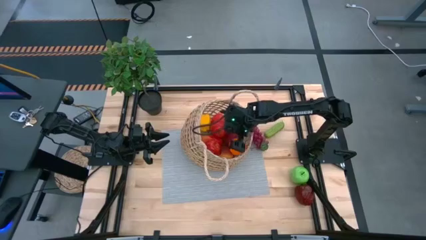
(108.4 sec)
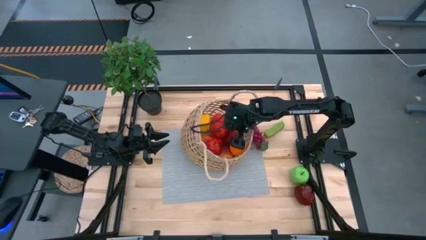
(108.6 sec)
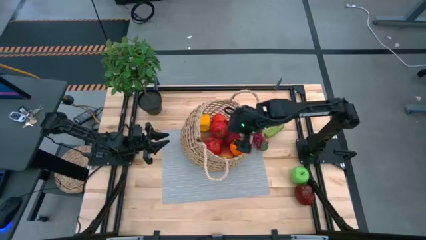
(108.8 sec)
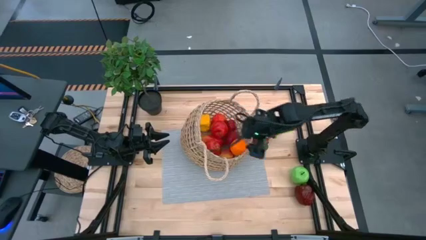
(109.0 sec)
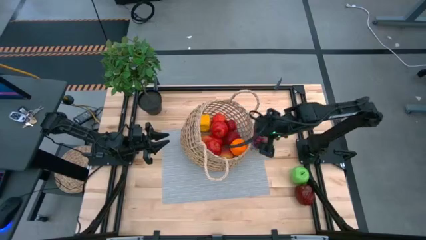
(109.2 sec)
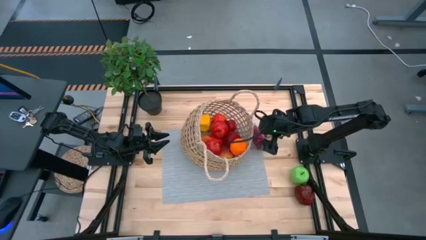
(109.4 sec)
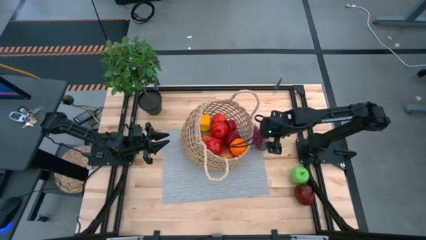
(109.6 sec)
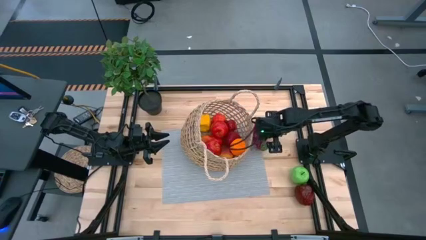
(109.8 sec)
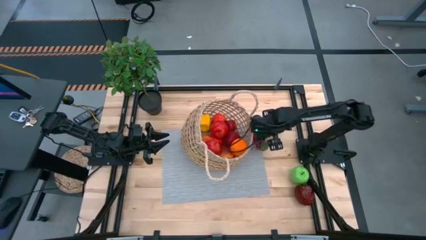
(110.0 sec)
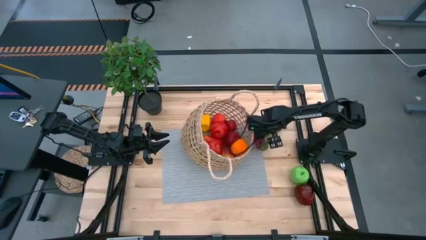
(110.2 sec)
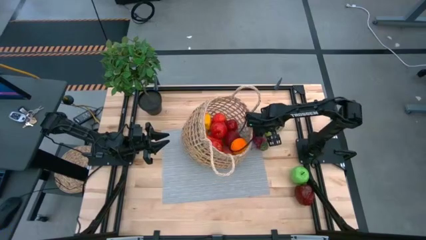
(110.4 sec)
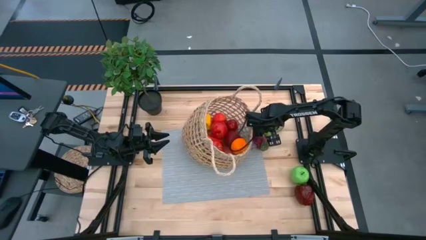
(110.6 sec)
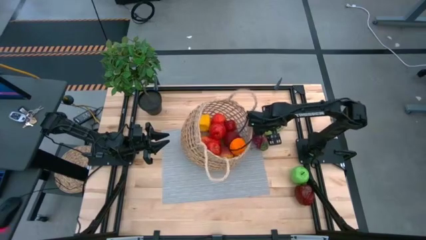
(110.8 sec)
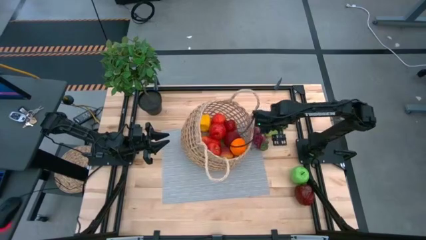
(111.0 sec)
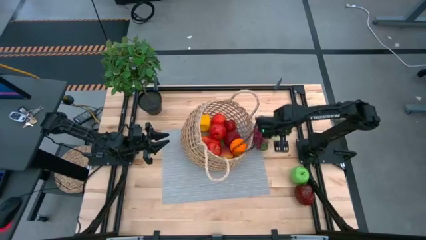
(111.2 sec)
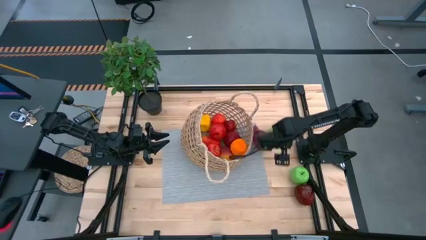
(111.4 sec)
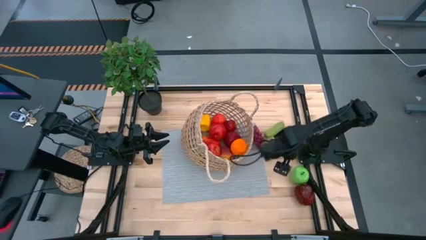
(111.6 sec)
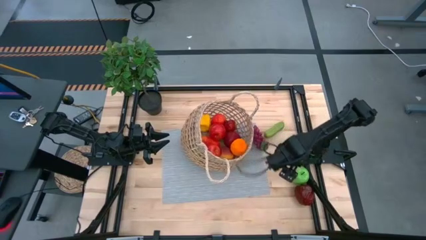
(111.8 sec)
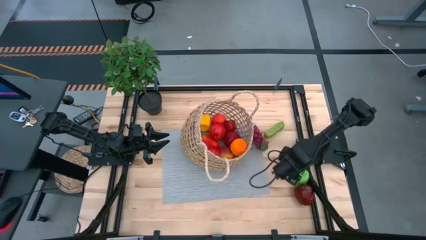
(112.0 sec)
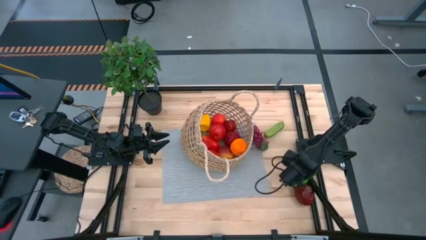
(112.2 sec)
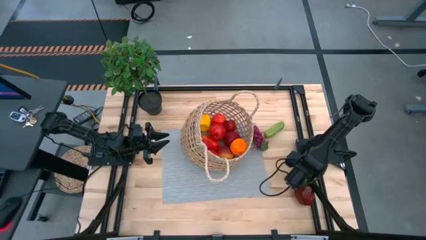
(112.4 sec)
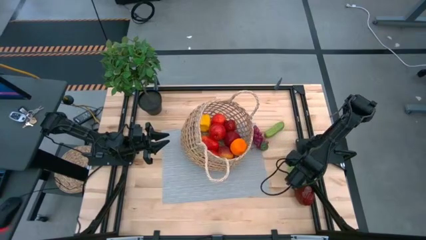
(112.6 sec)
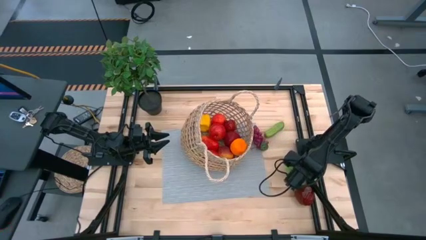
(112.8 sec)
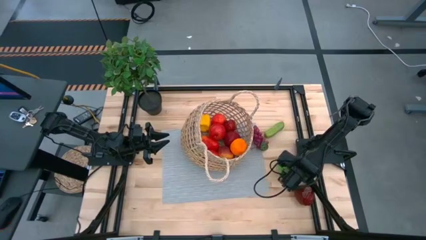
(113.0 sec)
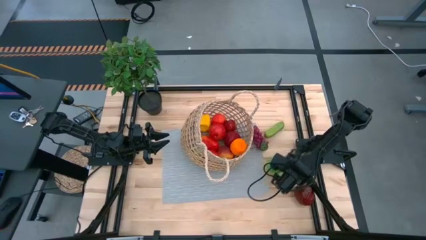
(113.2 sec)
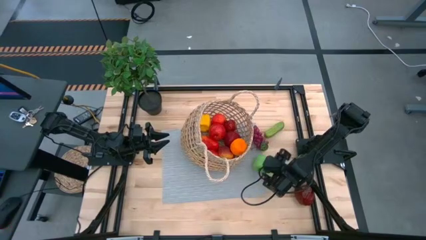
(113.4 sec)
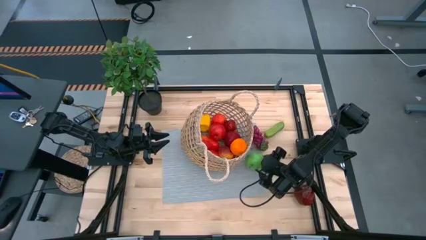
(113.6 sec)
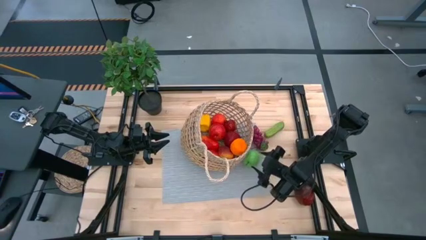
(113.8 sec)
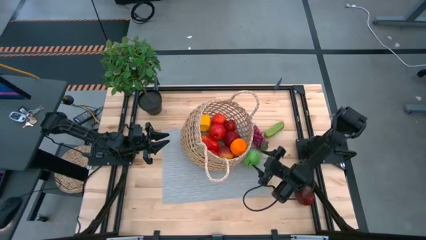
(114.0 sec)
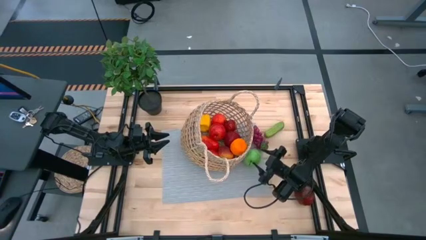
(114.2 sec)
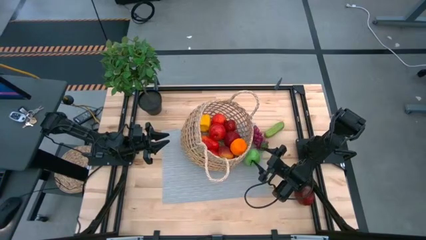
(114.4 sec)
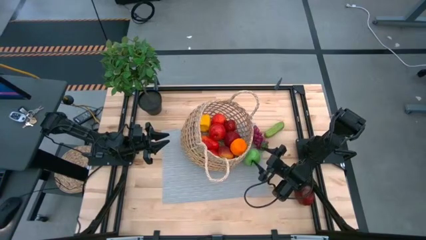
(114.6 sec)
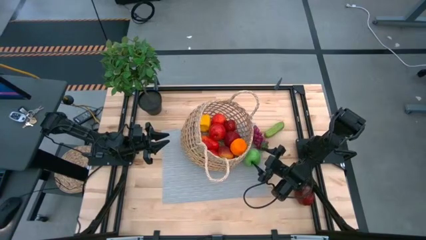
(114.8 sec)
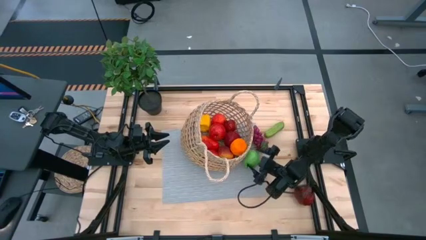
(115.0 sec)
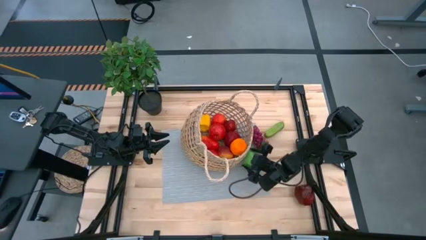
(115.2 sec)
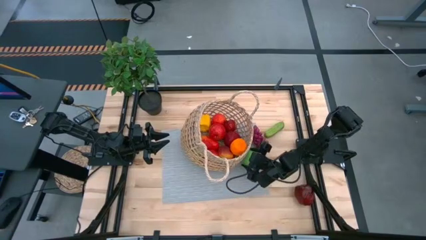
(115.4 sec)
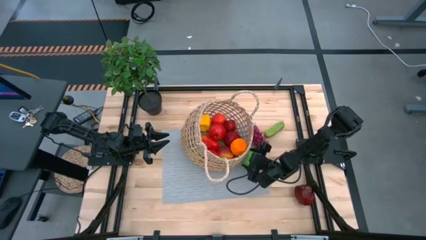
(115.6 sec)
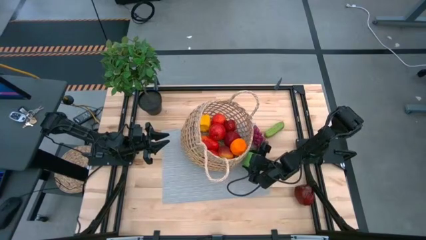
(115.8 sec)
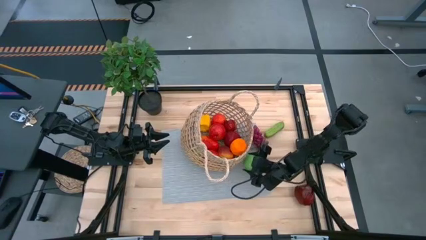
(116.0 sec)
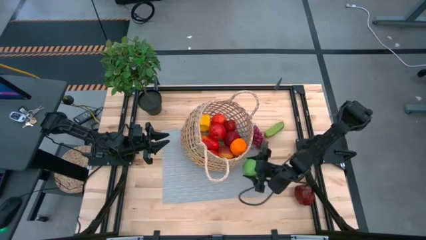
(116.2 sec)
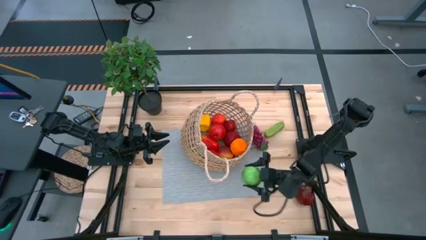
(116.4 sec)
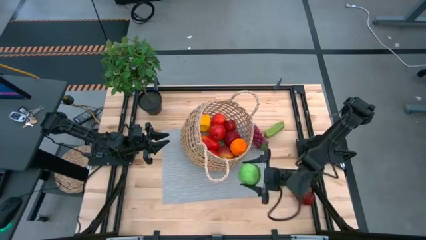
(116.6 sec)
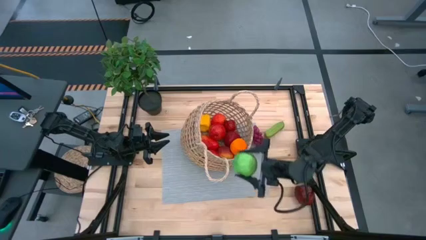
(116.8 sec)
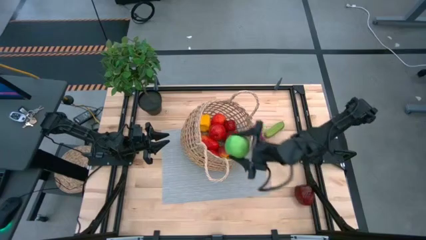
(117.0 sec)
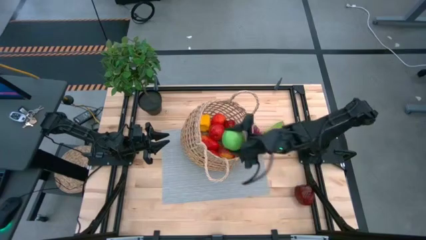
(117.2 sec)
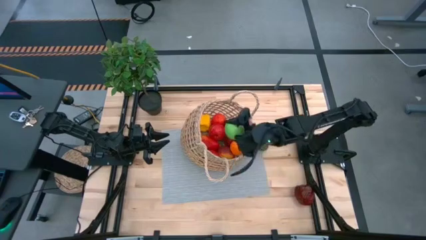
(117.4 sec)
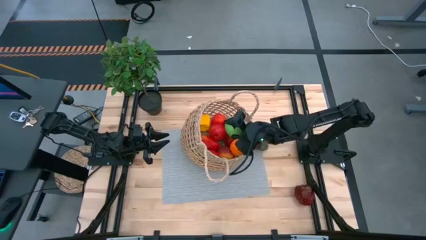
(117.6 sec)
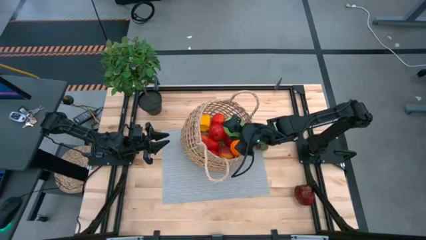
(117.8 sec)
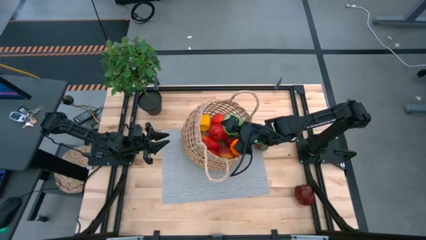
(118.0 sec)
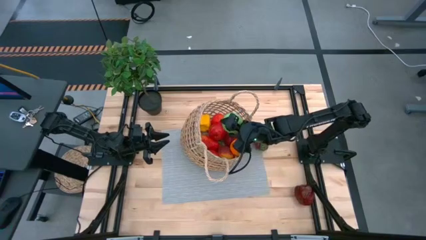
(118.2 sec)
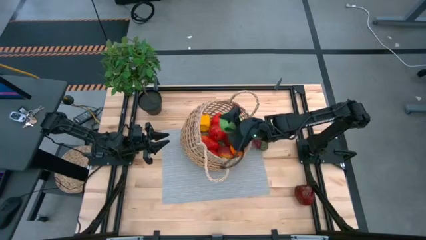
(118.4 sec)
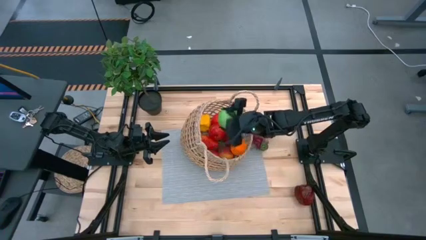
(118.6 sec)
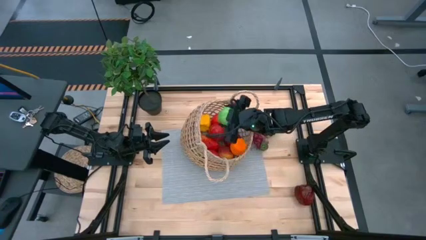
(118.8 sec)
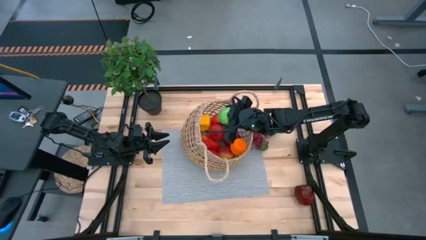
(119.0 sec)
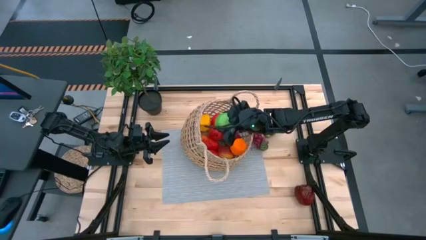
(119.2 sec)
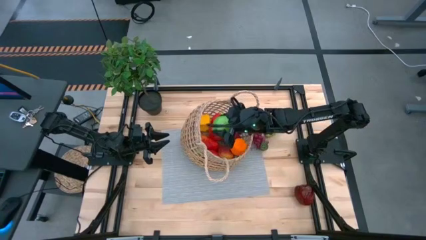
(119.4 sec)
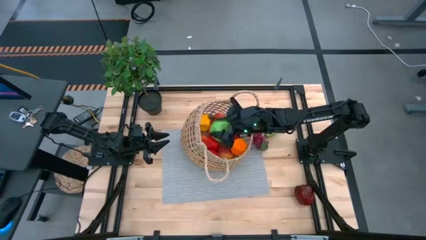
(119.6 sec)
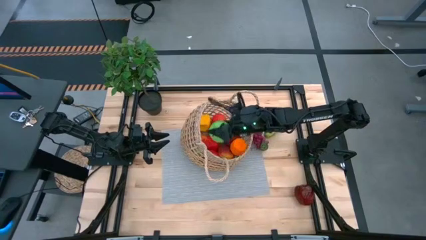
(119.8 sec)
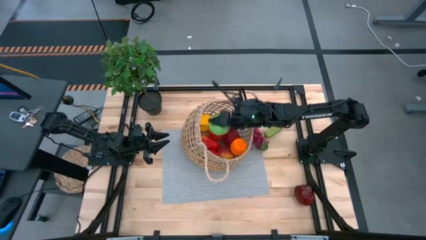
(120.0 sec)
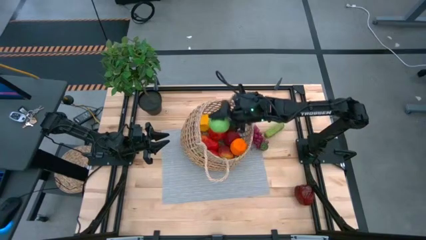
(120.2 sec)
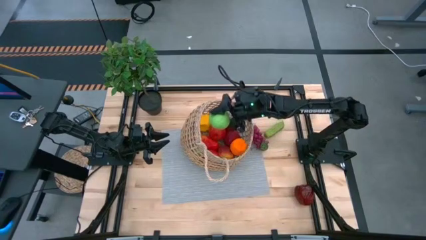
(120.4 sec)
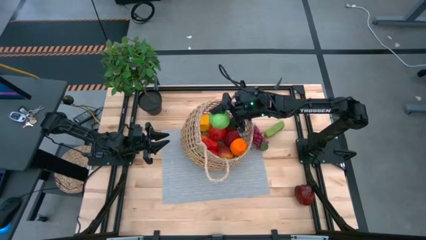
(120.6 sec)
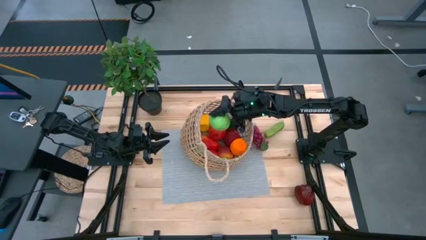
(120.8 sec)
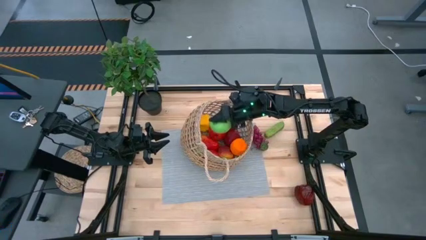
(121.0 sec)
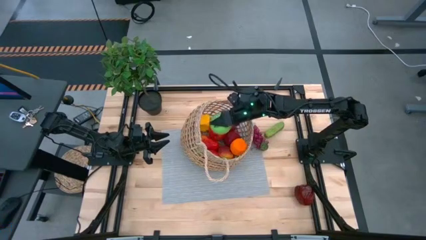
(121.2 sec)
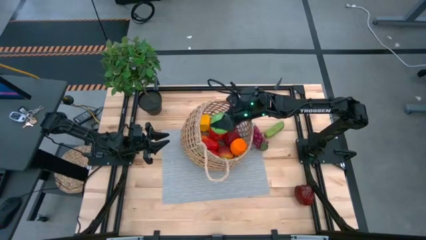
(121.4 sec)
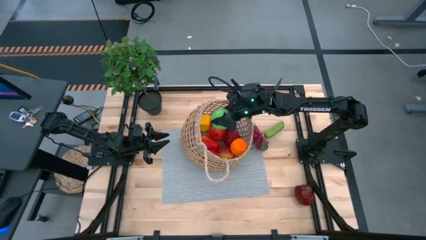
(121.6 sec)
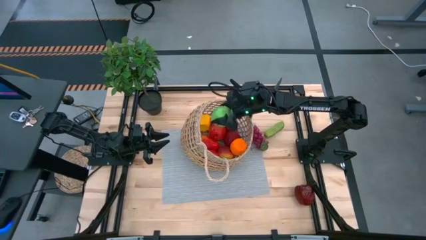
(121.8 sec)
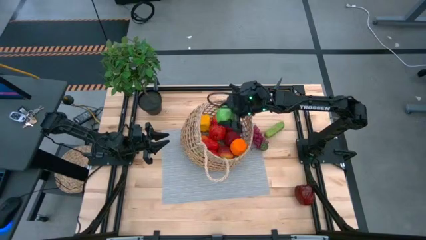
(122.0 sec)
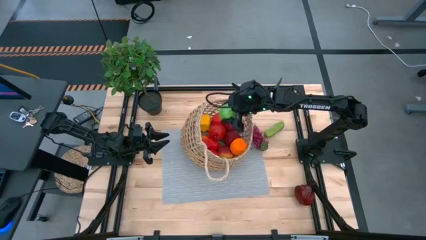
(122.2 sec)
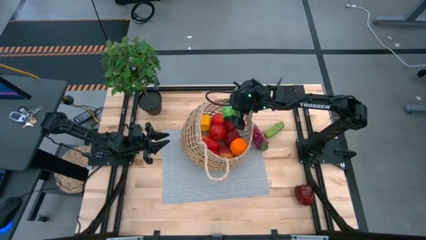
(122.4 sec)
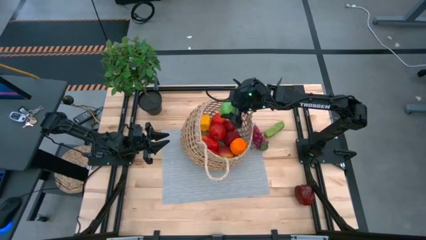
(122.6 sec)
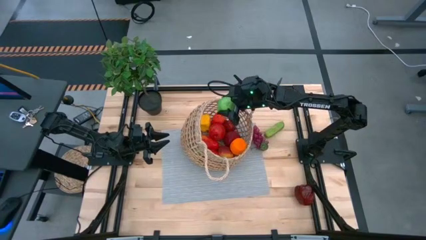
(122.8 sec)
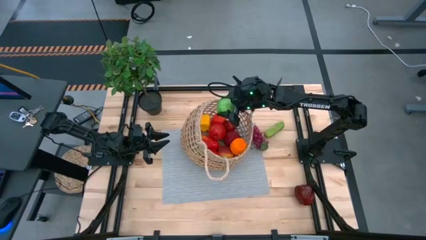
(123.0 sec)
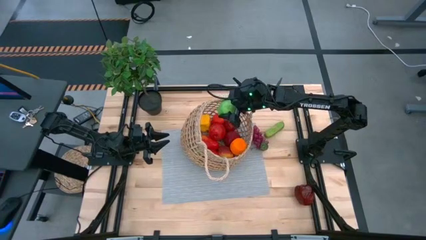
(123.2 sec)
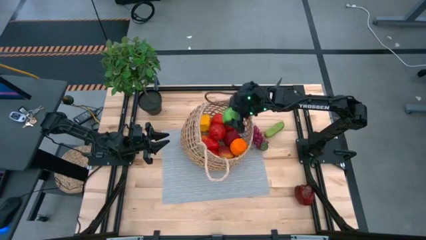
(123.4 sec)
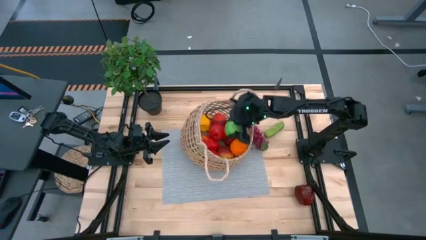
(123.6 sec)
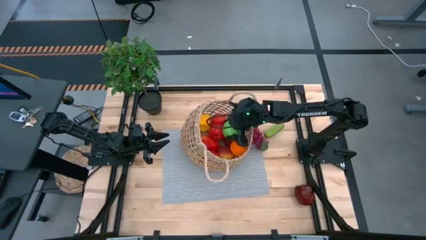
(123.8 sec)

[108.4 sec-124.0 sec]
Task: Build produce basket
Put the green apple into the brown basket
